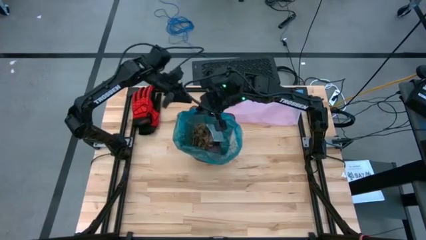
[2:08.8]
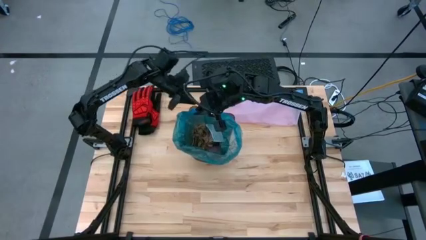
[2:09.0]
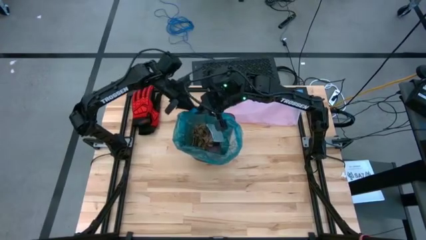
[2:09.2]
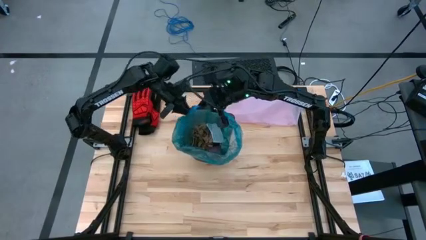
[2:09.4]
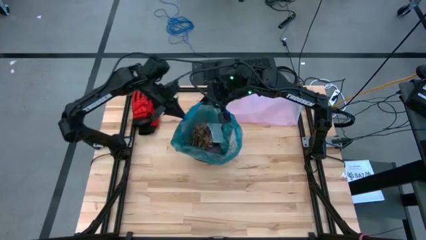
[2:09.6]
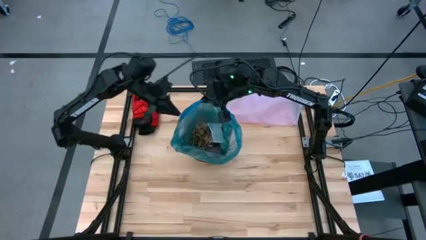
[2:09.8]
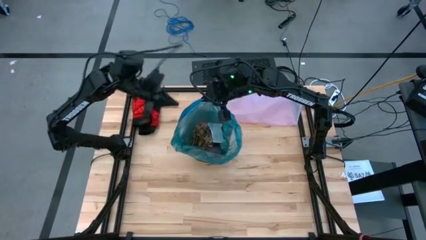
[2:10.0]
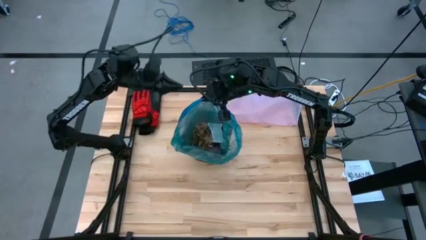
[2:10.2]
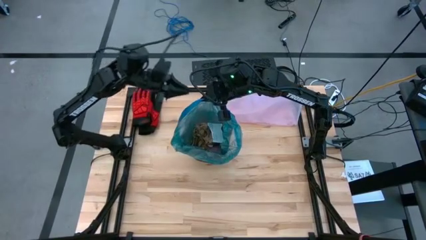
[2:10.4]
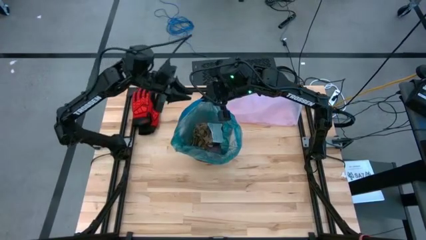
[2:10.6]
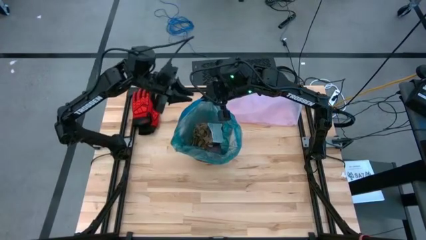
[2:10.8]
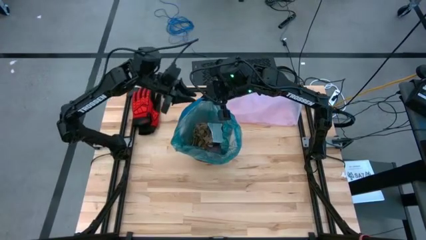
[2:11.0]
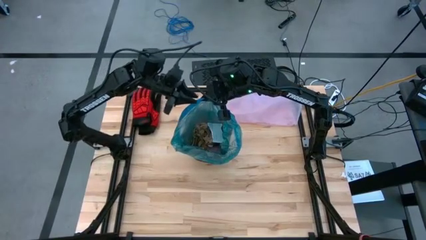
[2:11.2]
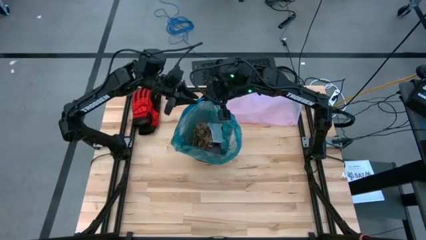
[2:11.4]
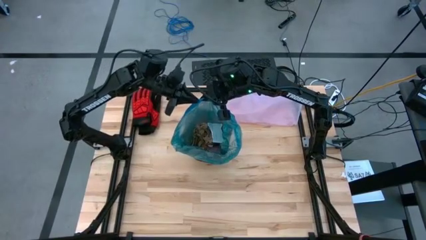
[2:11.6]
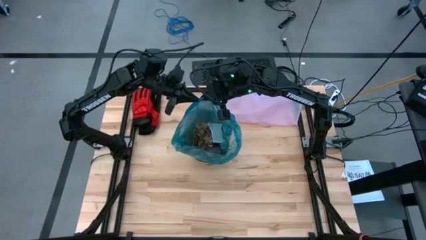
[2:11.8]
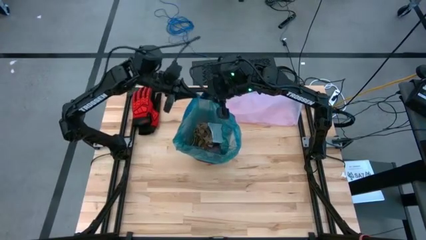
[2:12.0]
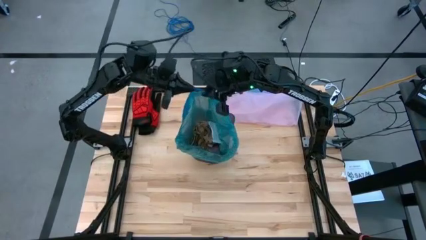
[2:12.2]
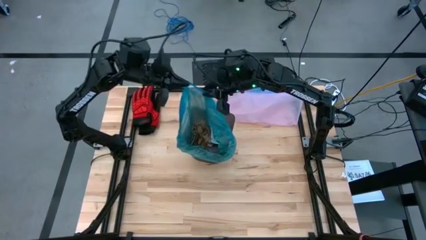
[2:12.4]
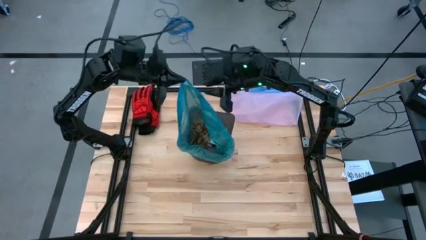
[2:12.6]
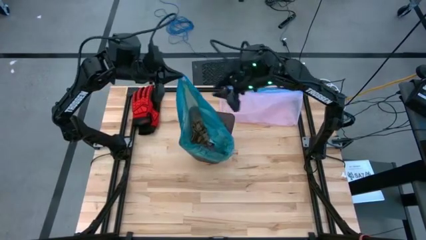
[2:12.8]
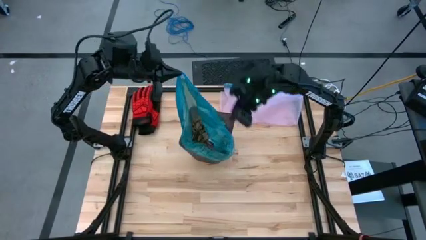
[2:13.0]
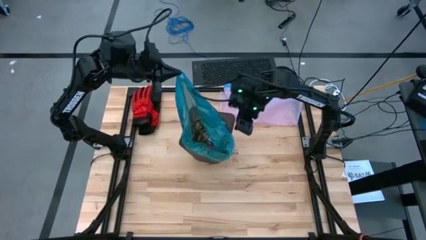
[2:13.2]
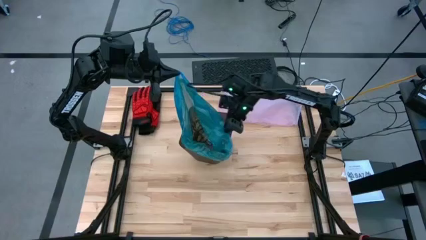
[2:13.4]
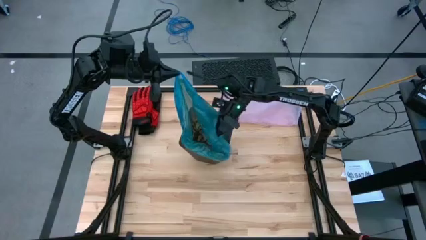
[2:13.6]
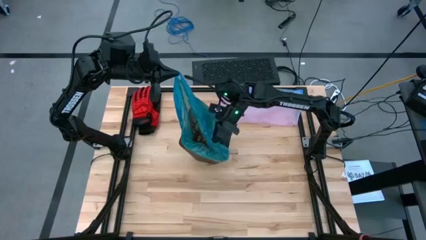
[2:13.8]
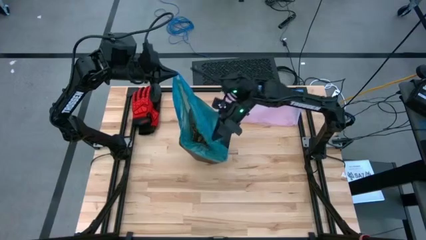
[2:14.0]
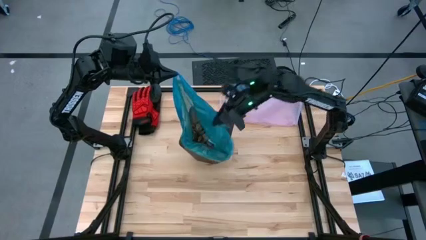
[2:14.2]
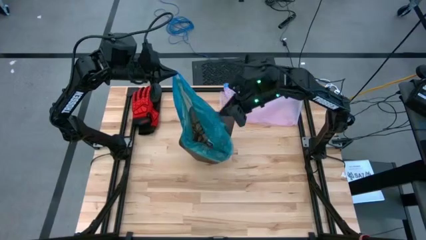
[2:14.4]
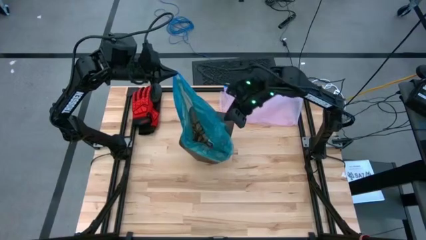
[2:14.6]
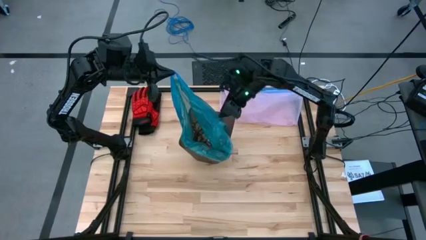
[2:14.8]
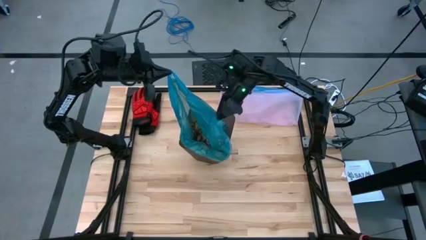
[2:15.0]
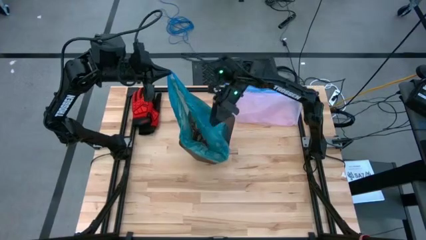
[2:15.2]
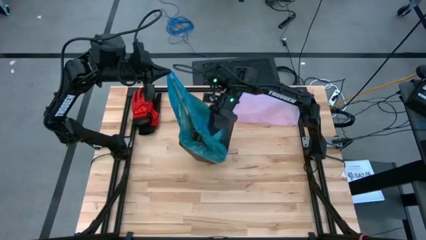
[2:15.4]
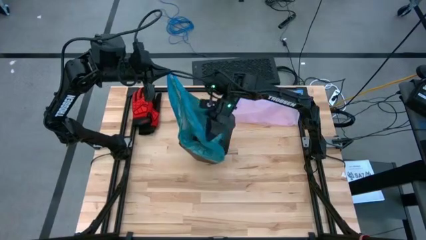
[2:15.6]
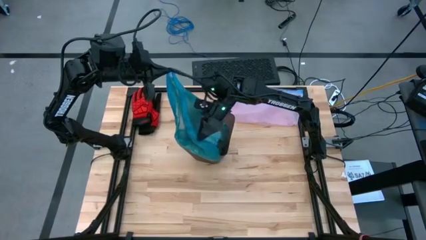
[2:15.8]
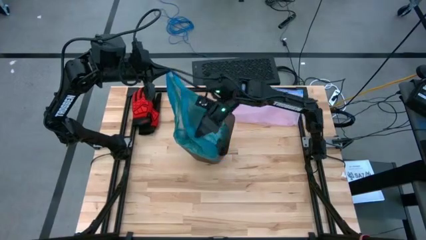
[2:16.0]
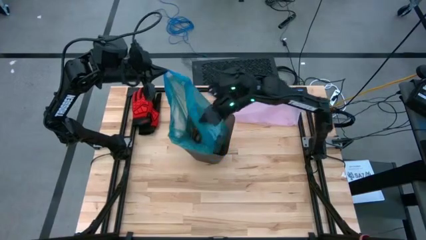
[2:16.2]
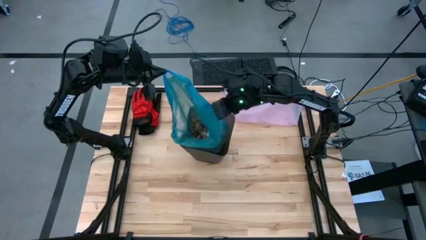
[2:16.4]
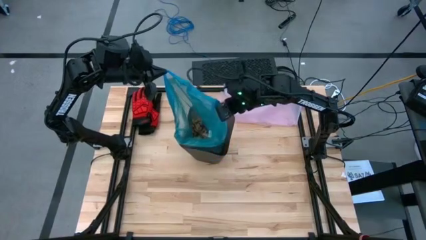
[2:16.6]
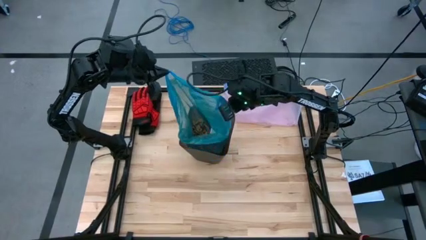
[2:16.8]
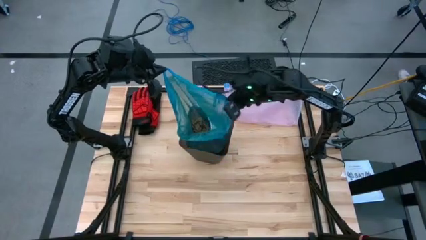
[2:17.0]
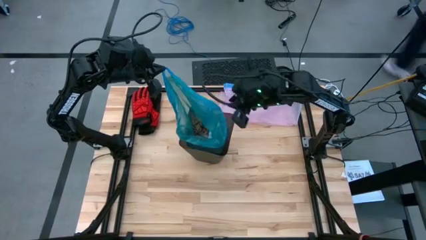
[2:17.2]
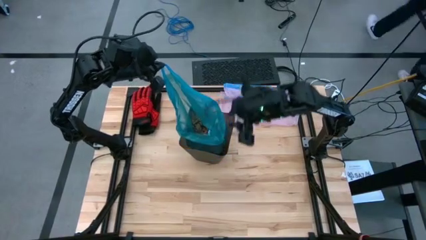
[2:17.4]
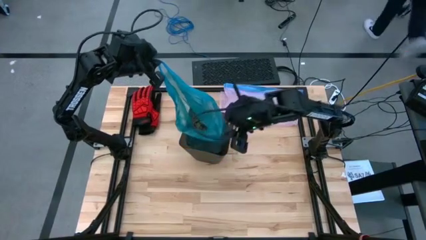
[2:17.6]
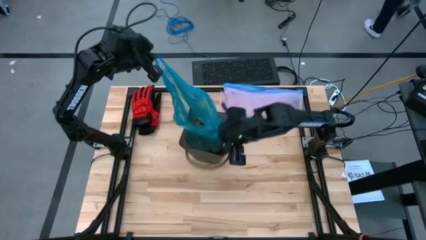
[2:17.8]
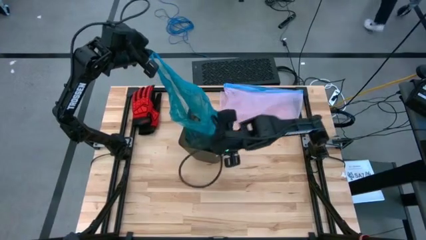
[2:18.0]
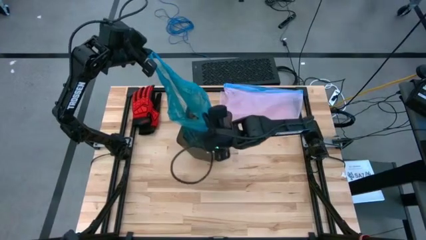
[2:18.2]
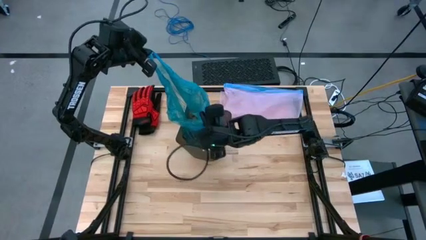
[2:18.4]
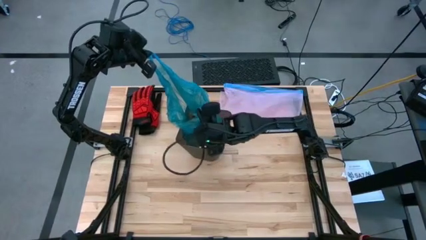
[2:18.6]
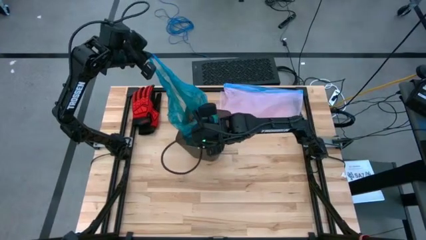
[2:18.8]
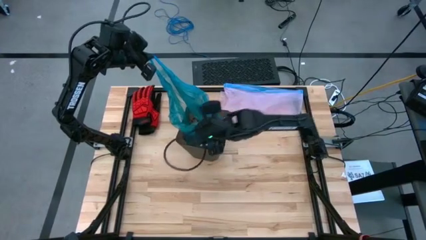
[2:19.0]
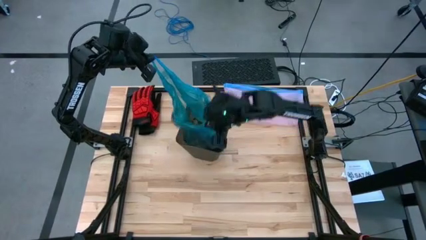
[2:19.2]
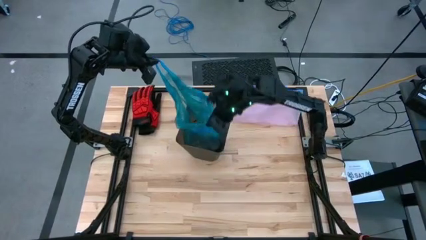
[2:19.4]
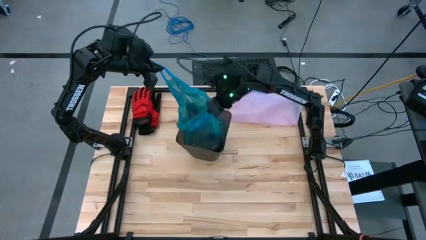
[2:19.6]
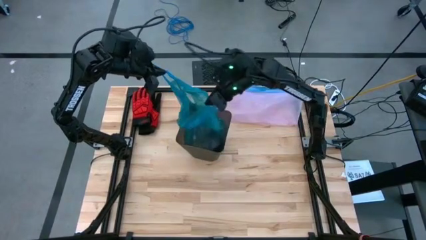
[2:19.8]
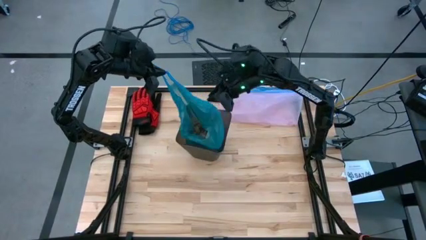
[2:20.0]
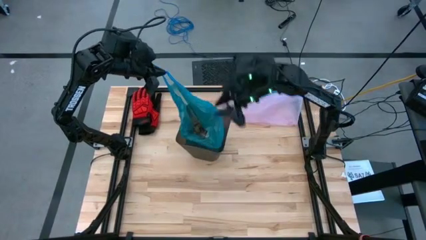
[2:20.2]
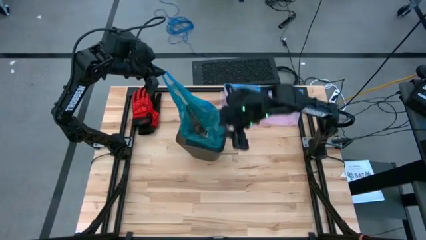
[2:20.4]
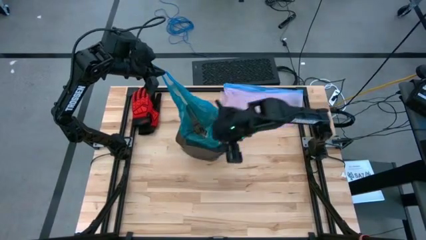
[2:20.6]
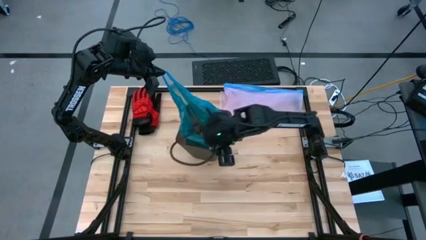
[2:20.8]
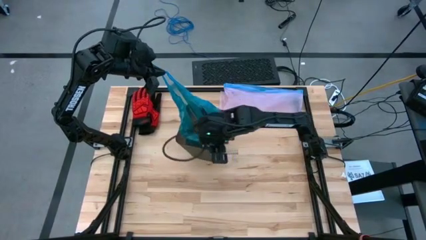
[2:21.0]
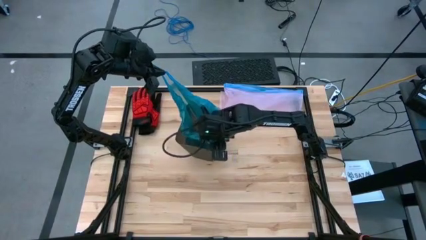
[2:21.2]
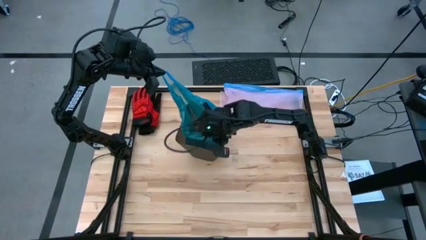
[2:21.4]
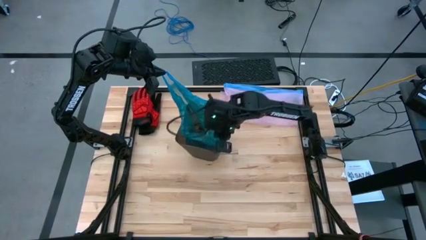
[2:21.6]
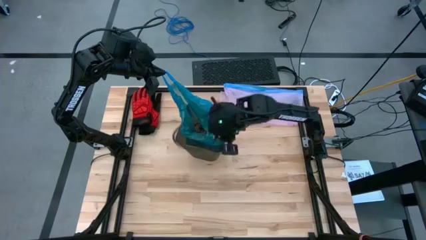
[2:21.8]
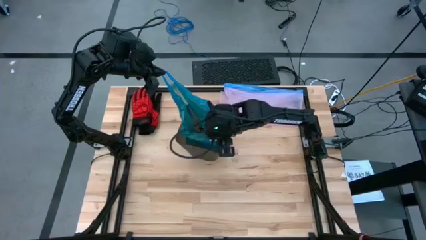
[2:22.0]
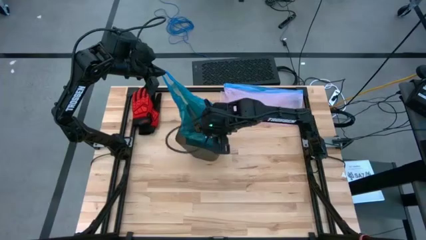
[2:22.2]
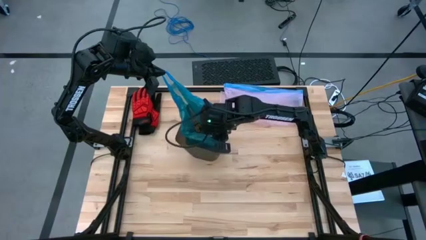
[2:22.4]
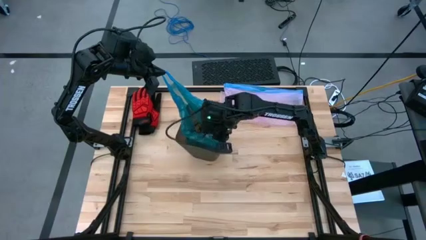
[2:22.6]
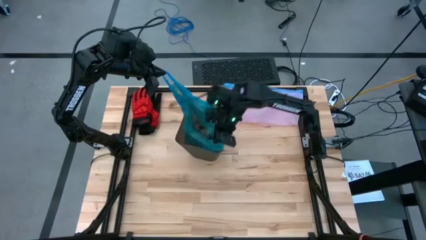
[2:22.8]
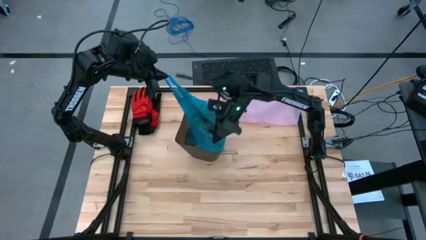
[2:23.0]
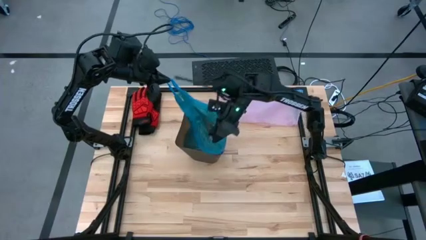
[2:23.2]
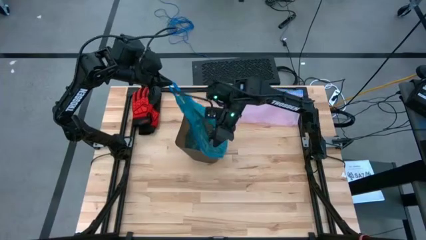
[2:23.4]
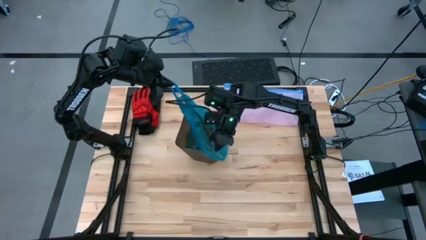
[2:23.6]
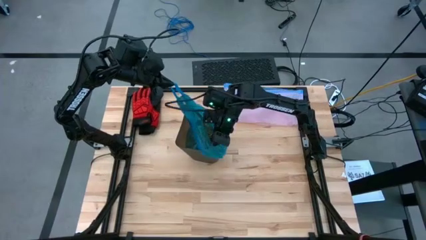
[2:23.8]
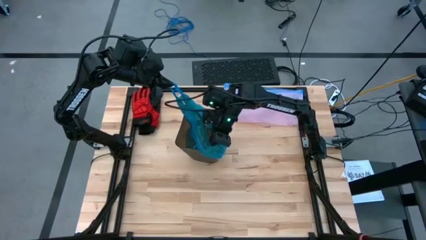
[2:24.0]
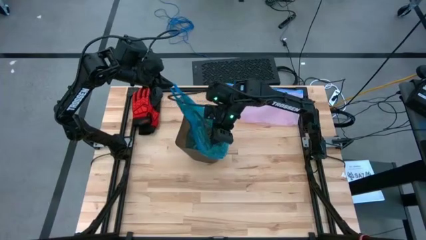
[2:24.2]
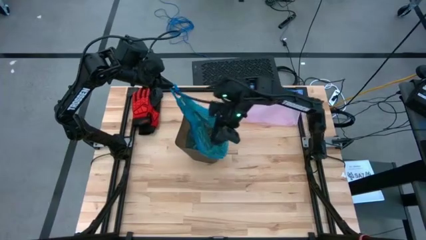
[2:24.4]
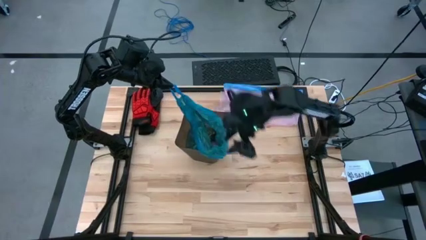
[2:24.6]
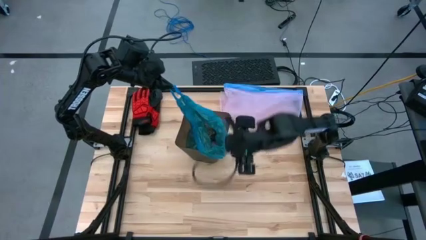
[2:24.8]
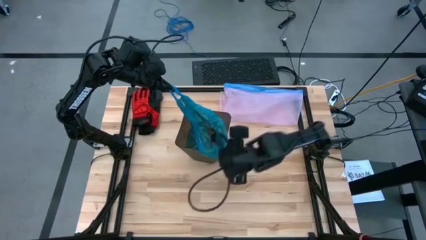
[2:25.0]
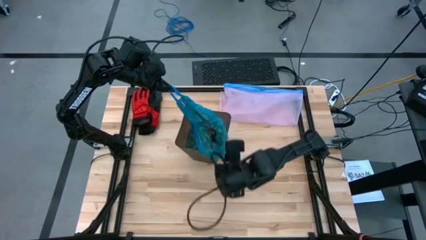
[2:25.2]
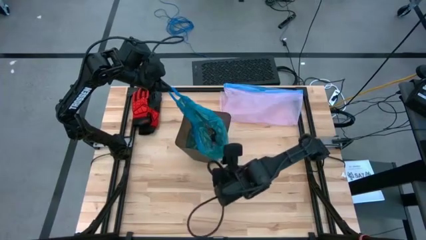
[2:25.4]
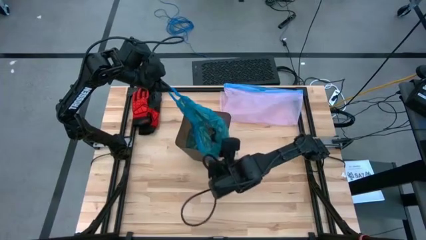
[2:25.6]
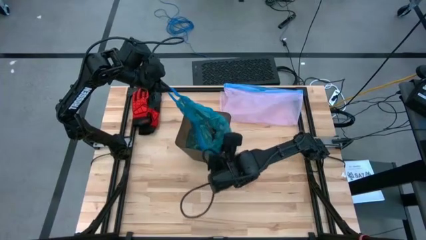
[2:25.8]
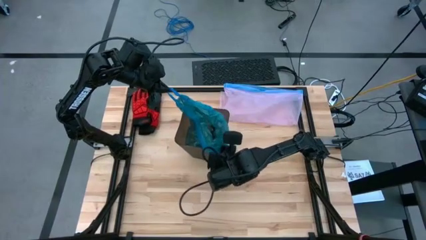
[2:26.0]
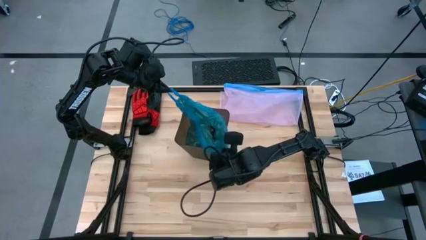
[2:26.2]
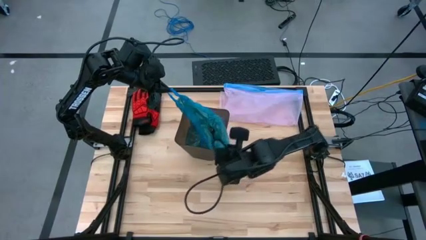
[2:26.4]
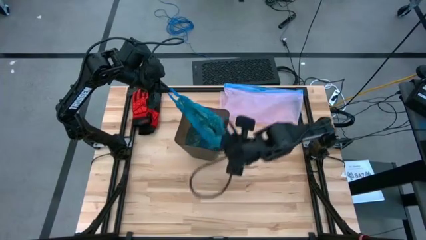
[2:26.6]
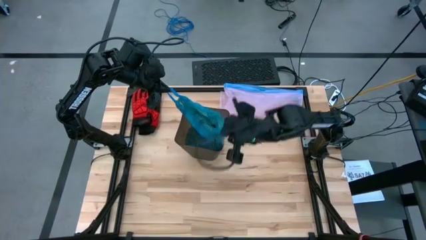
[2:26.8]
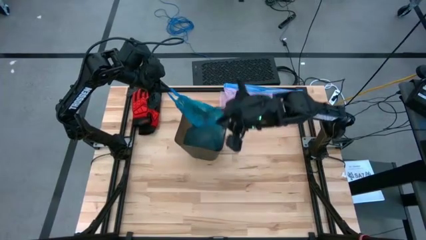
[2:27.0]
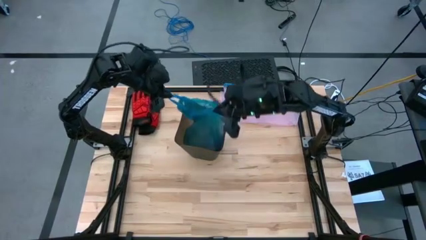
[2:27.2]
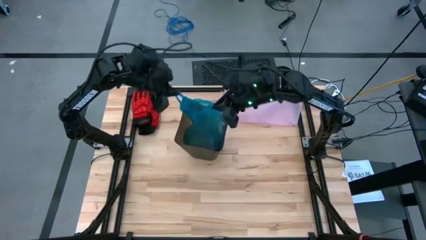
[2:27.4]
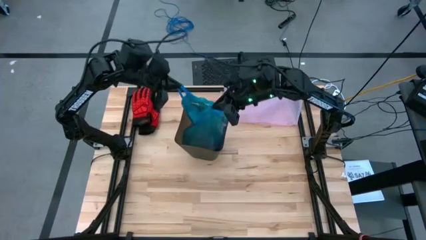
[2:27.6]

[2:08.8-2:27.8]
Task: place trash/remove bag and relplace
Remove the blue trash bag from the black trash bin
